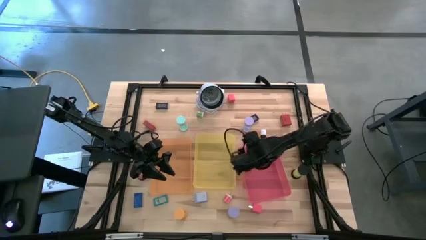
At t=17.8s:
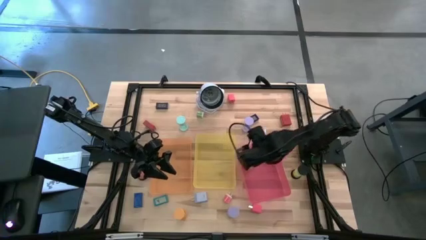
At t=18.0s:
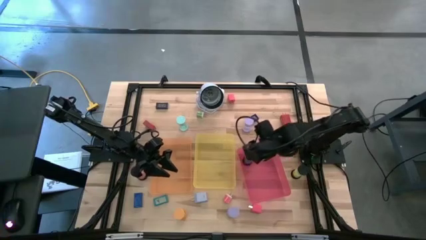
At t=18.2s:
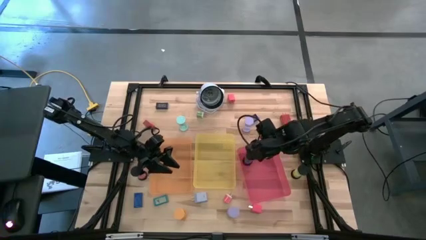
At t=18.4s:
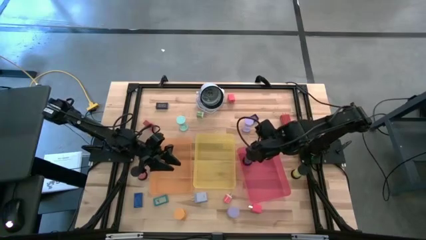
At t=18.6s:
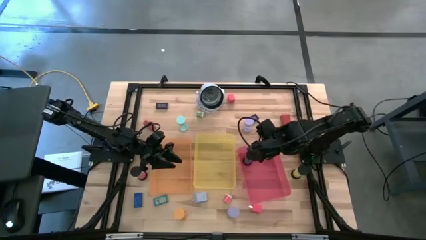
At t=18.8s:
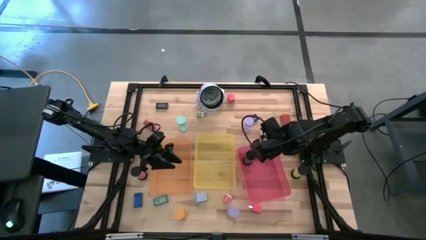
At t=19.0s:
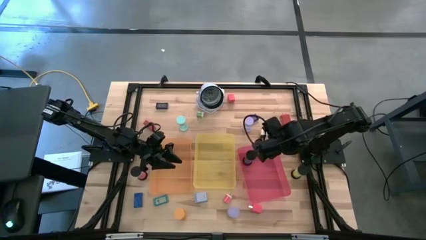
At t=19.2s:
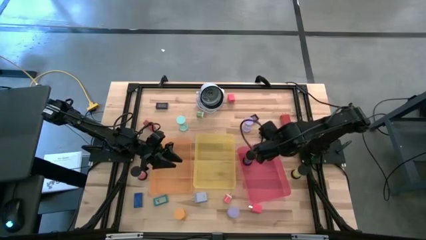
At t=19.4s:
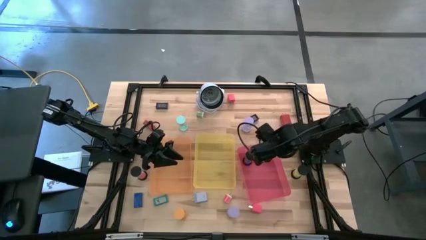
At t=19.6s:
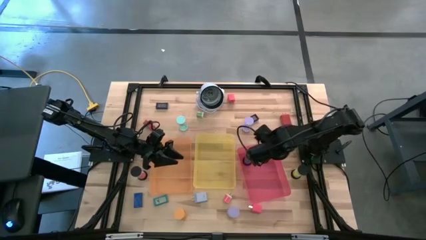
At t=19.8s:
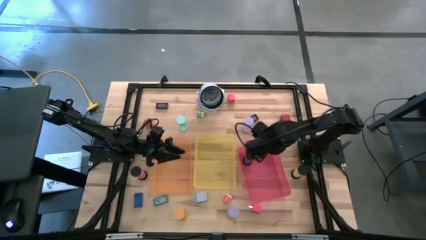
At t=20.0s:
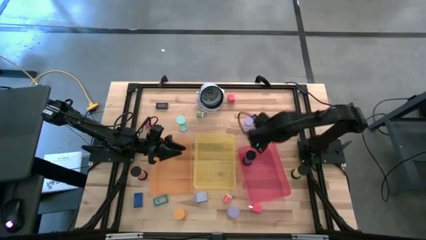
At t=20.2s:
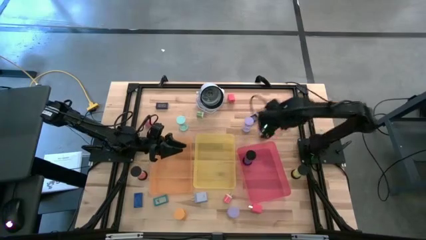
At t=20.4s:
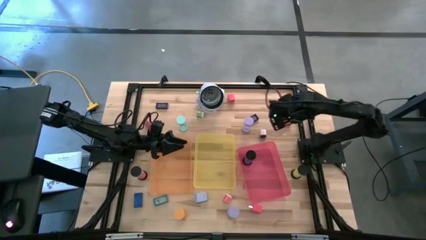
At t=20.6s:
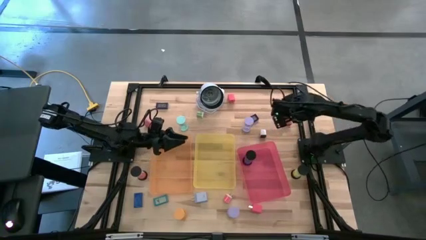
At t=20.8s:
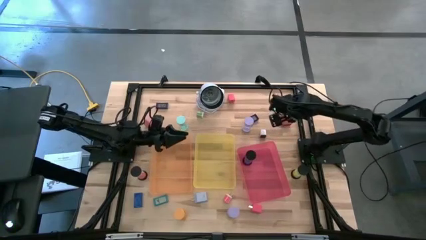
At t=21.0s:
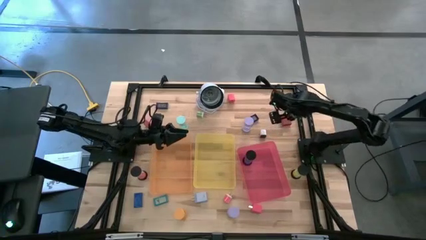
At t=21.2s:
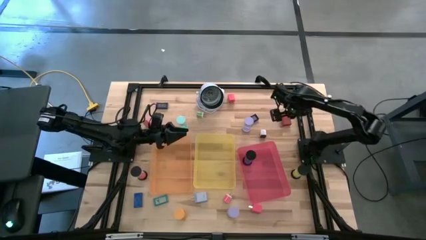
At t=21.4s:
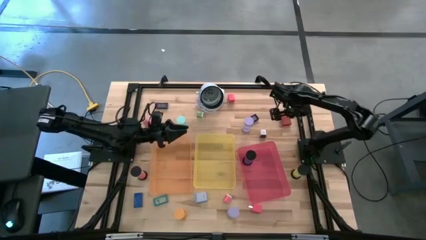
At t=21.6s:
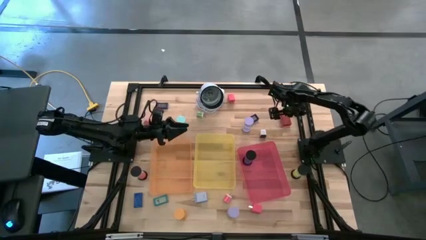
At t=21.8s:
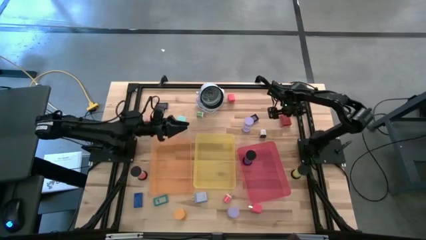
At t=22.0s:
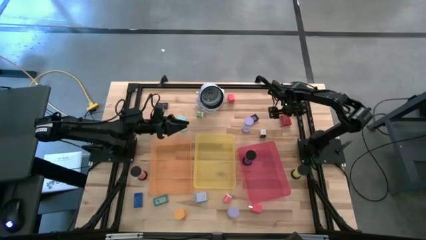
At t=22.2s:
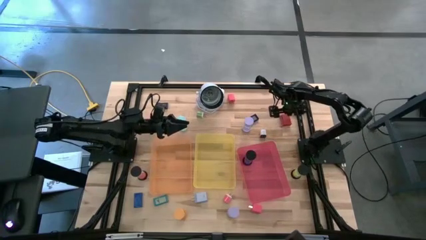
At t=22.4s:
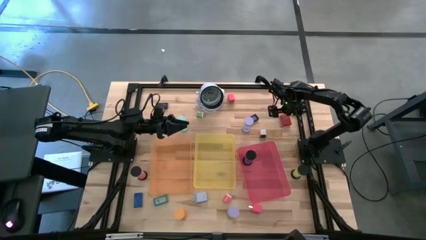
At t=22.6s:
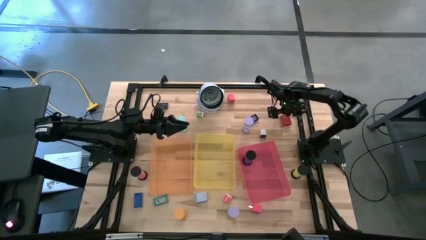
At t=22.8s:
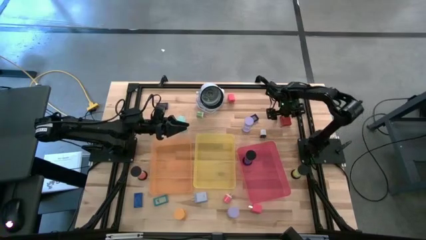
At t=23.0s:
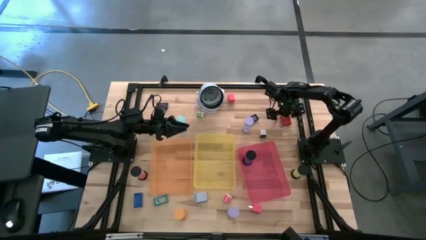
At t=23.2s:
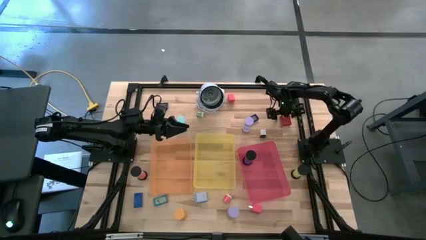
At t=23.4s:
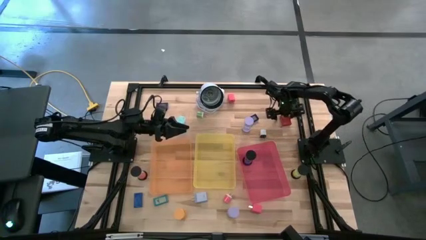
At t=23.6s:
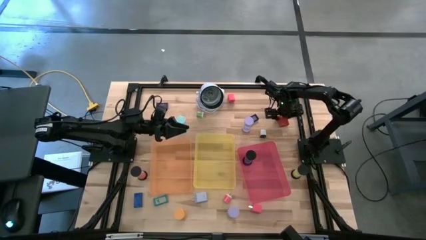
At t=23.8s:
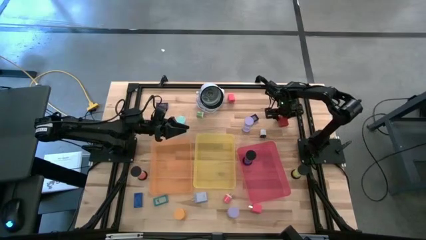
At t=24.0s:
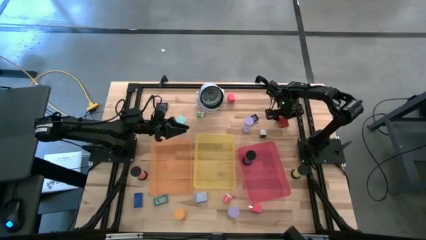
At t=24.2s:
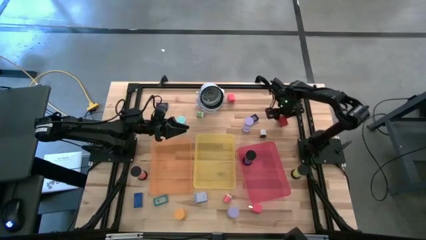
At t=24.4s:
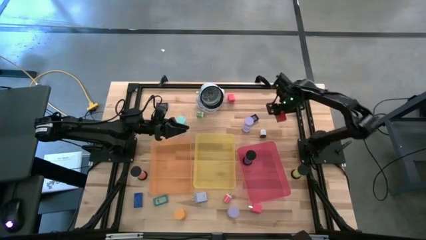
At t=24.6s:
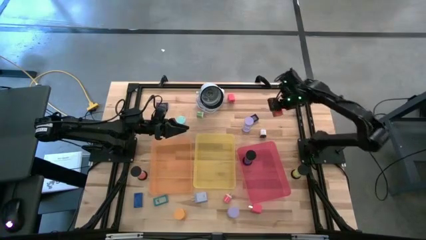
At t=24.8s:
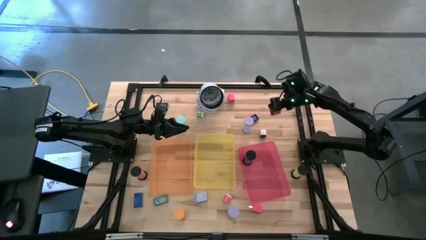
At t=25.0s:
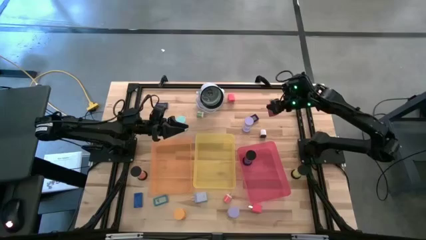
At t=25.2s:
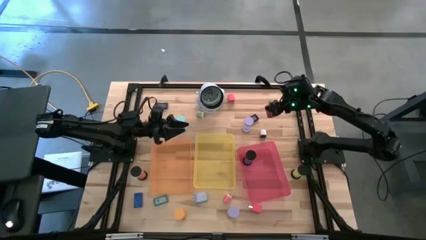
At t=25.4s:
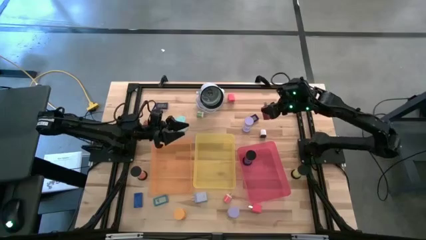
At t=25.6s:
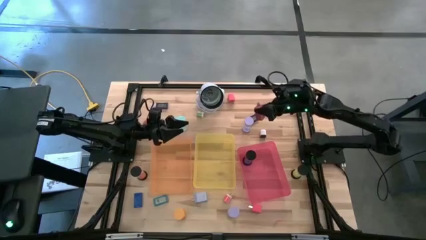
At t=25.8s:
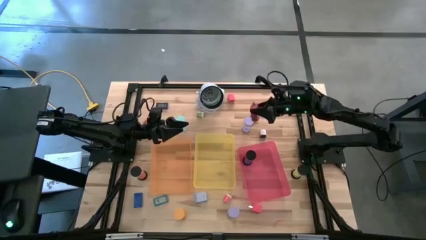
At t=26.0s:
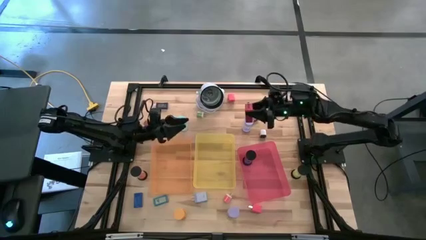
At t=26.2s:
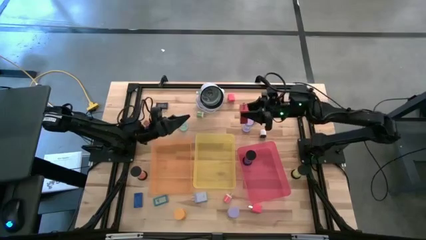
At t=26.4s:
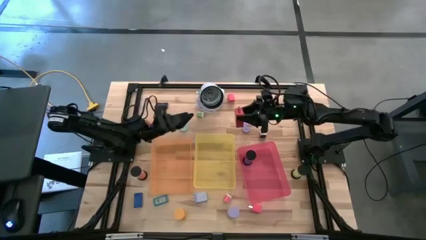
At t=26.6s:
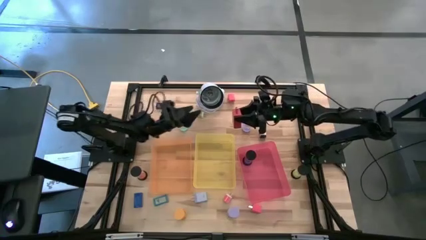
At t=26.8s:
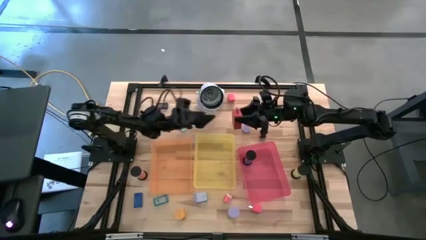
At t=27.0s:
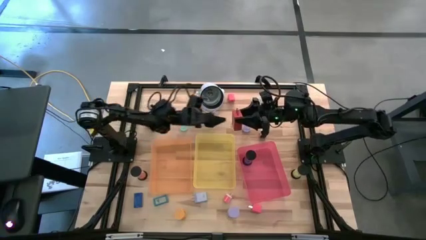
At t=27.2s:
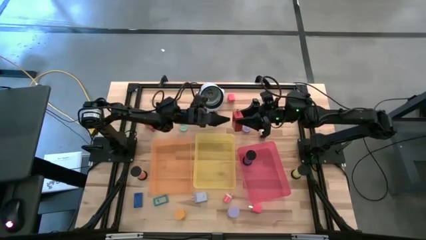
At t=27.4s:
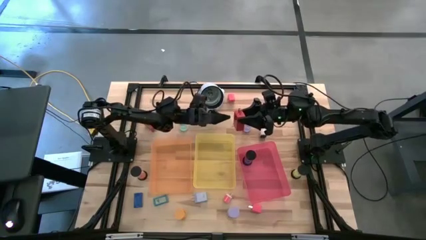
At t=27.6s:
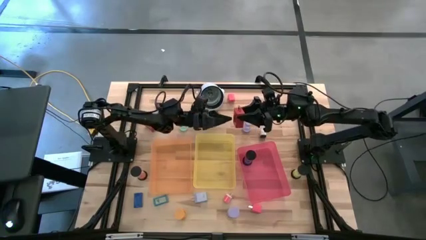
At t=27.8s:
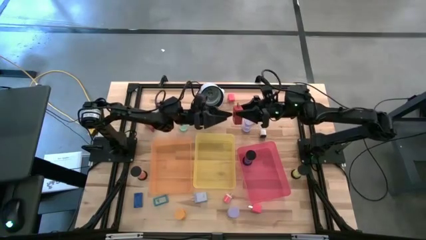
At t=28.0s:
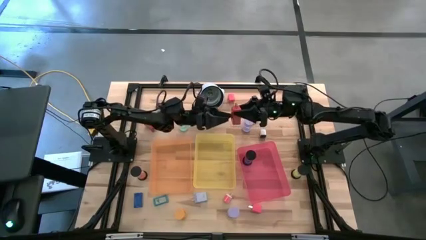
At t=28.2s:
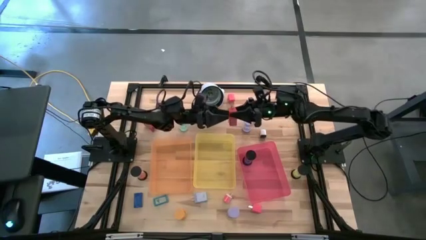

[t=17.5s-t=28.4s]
Task: Pick & Place Office items
Put the red charger adaptor into the orange bin
